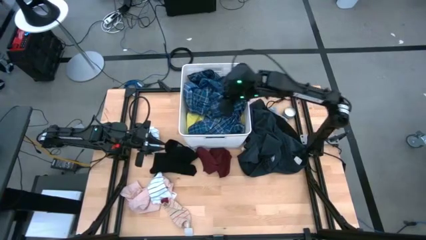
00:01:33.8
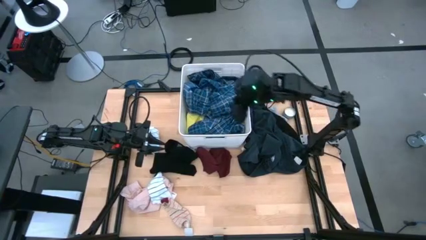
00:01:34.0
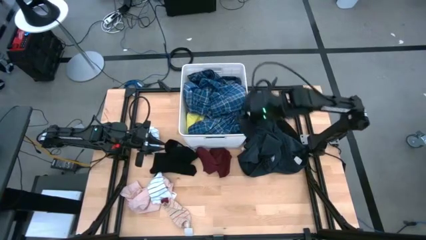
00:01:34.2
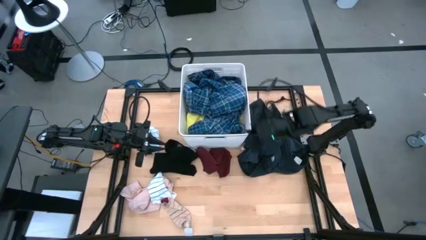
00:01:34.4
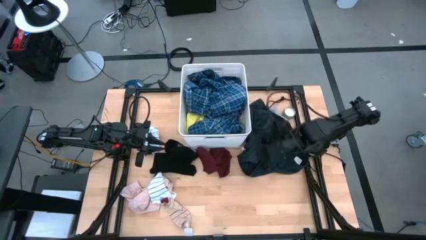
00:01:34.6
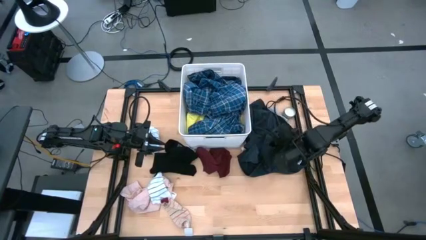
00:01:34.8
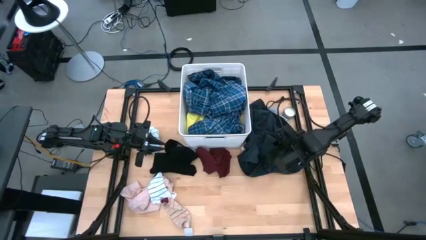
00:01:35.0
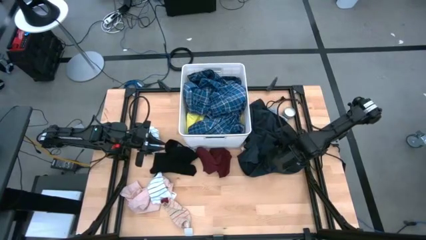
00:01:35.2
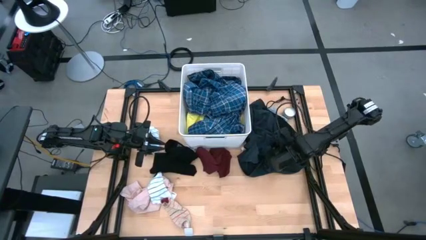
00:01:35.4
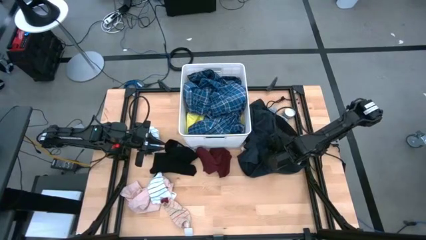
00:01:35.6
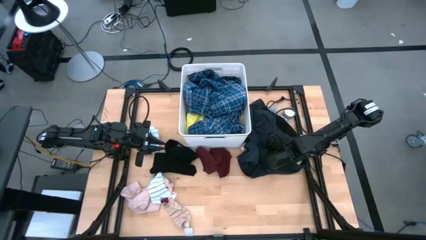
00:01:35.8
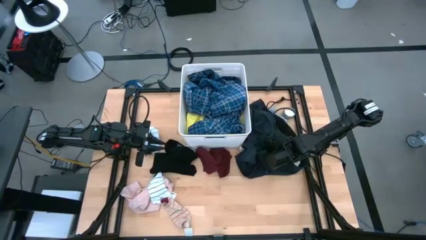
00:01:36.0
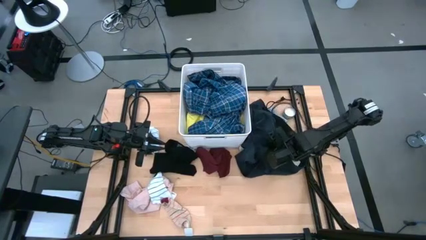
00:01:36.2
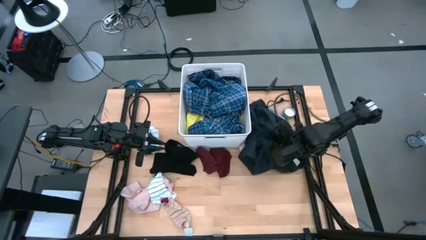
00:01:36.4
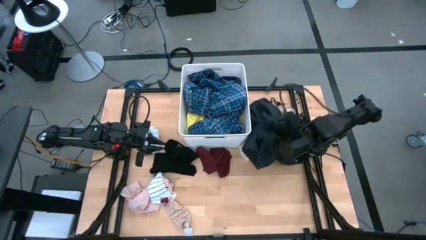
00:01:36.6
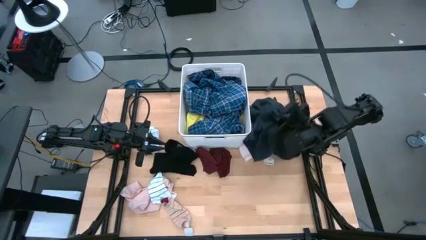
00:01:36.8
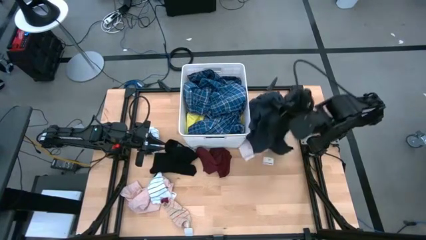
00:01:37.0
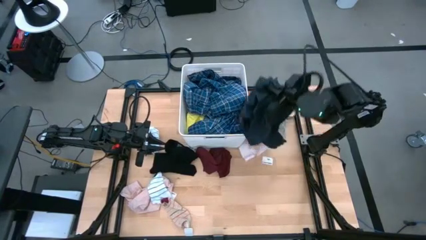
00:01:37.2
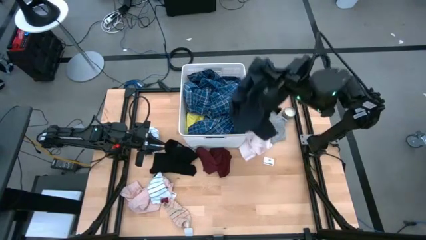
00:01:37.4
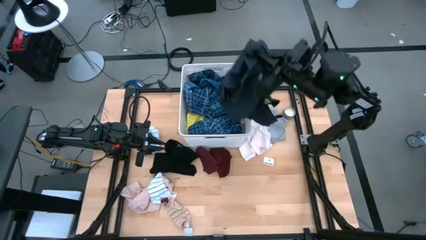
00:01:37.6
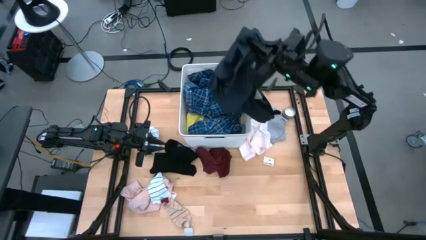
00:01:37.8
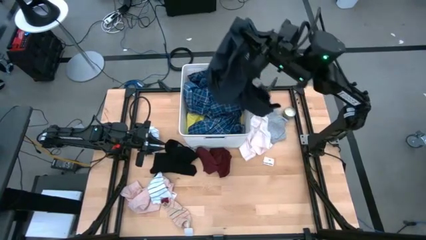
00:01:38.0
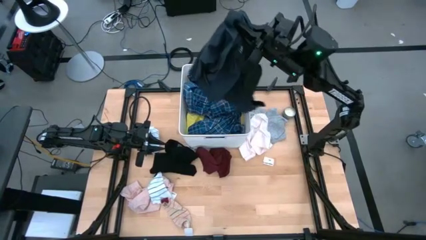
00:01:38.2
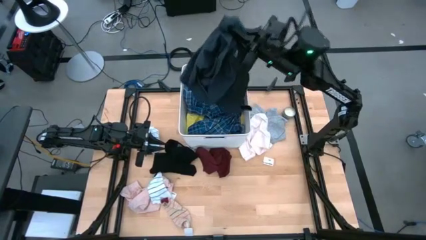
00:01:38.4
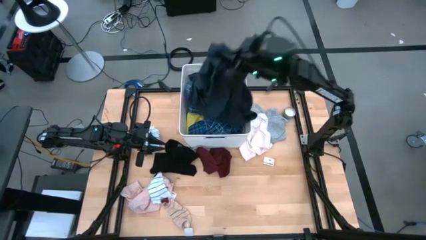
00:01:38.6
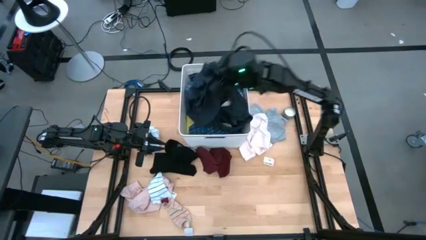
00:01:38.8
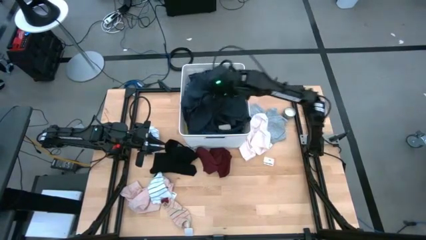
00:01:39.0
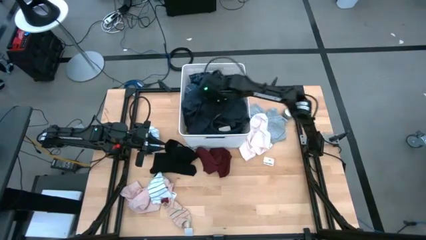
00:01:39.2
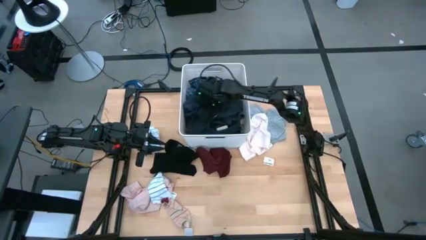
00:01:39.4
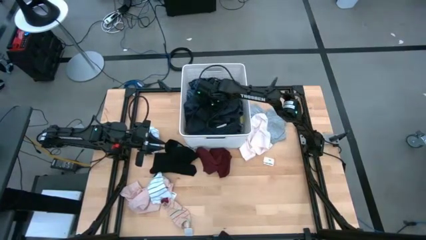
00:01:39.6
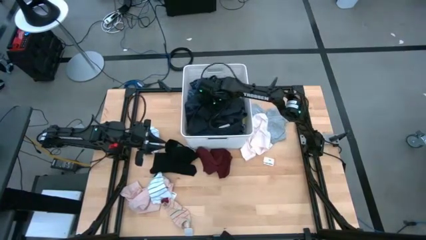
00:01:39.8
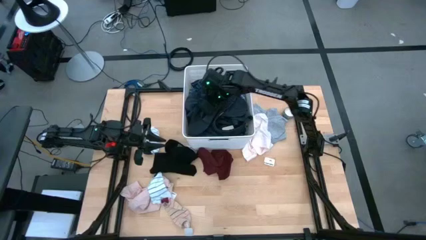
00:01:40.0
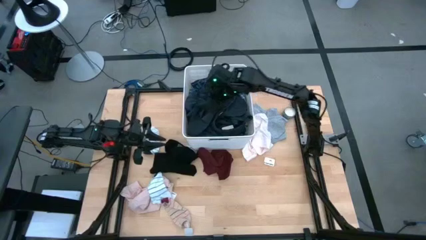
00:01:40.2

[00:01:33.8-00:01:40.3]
Task: Sort clothes
Put the dark green short into the laundry bin

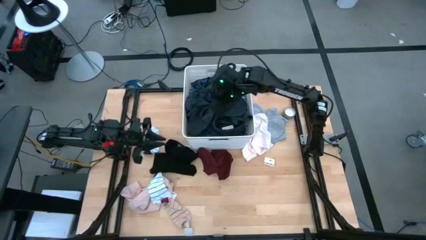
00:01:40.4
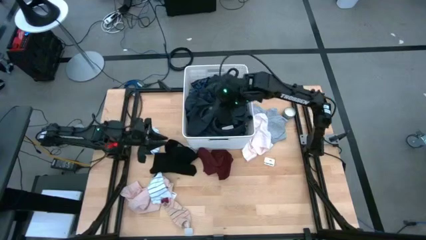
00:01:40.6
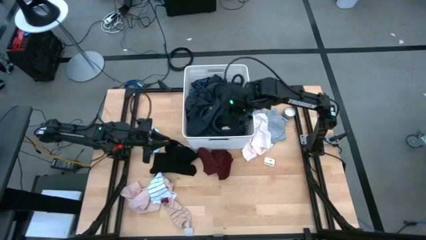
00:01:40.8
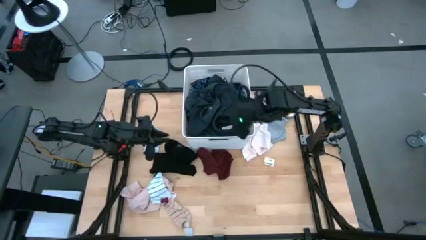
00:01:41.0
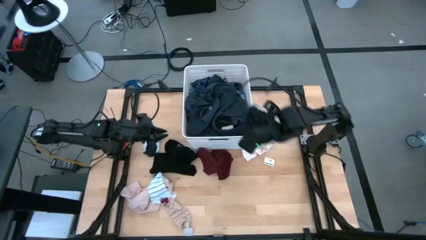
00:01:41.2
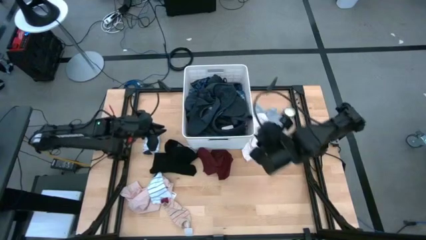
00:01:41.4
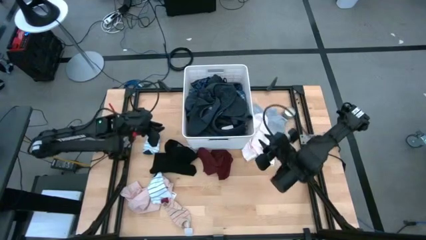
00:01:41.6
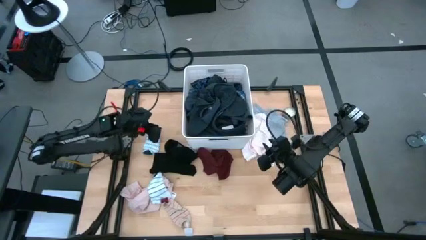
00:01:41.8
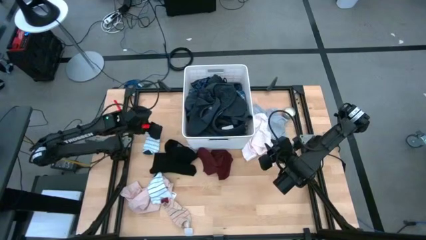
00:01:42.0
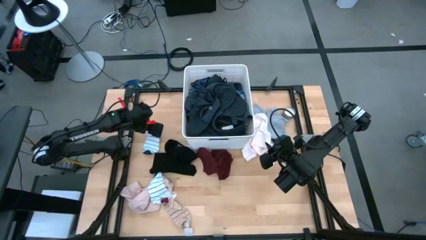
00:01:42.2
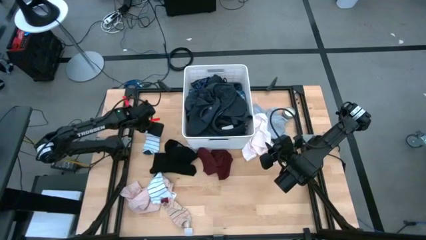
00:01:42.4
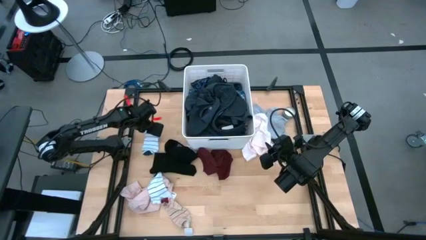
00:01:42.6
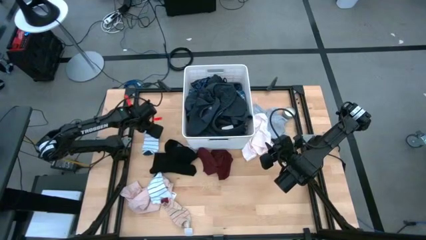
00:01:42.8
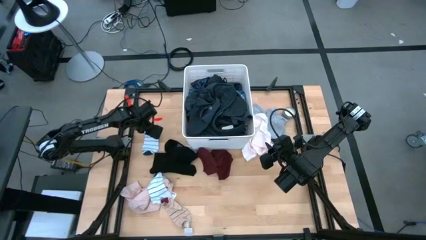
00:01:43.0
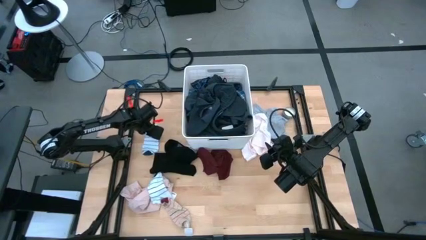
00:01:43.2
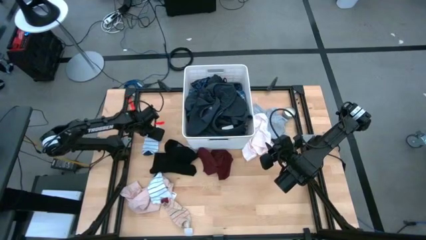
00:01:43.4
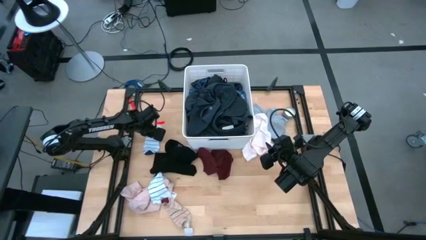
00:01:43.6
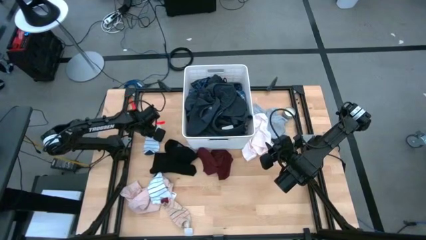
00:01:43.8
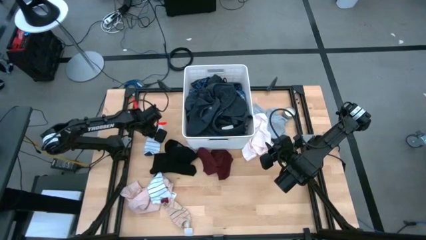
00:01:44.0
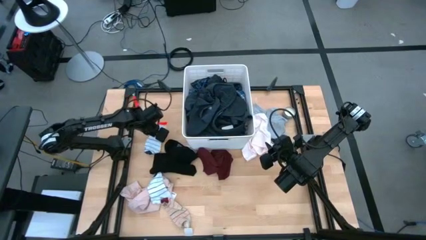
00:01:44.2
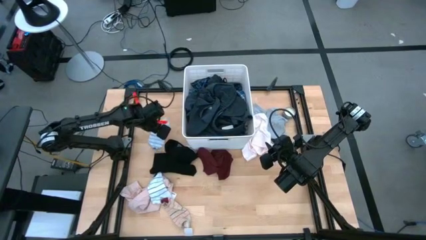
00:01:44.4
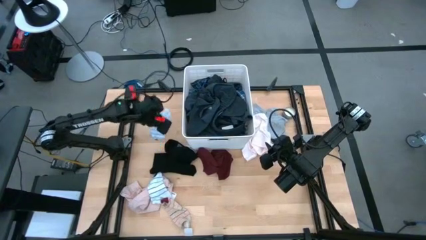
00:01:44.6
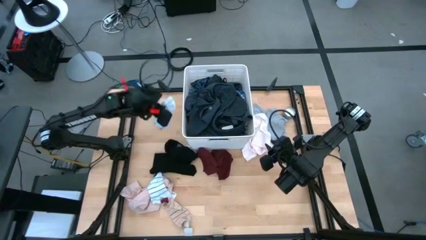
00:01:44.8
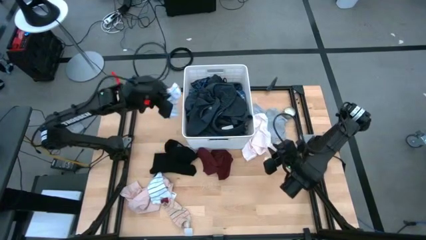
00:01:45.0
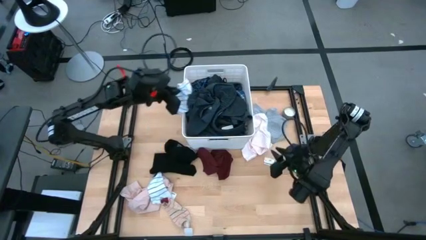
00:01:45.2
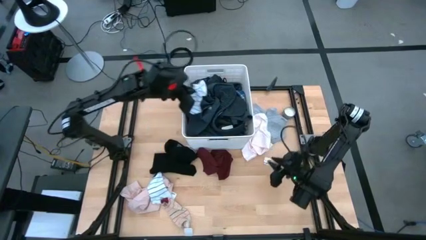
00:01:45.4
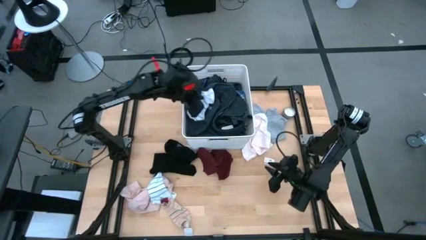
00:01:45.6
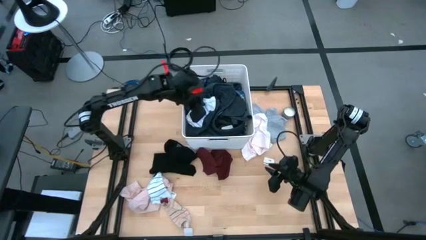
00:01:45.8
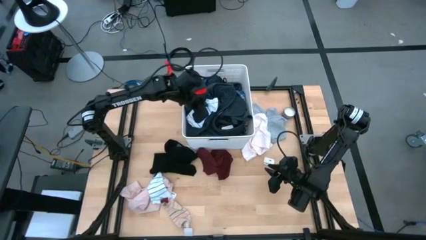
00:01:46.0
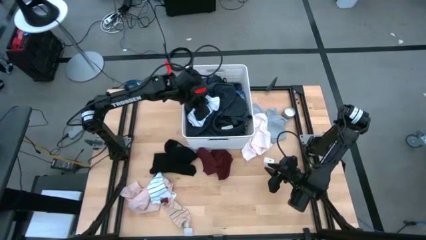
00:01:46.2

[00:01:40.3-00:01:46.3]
Put the white sock into the laundry bin

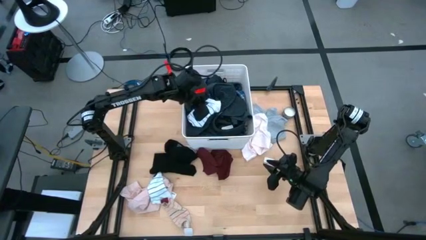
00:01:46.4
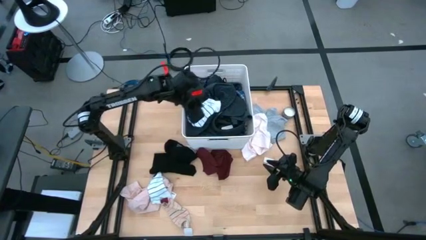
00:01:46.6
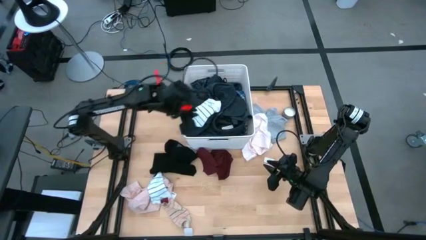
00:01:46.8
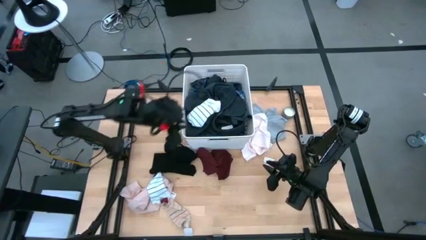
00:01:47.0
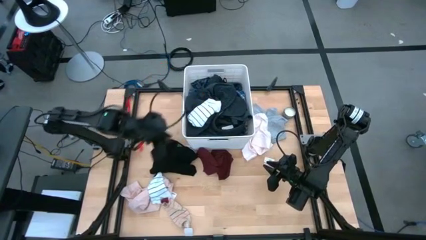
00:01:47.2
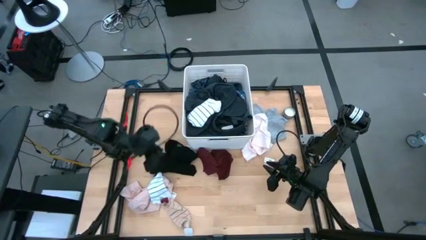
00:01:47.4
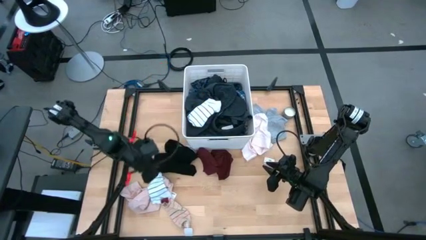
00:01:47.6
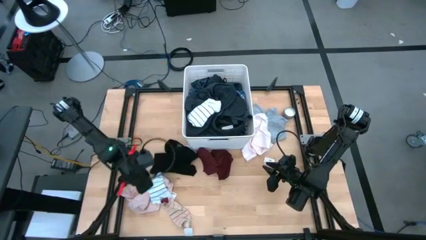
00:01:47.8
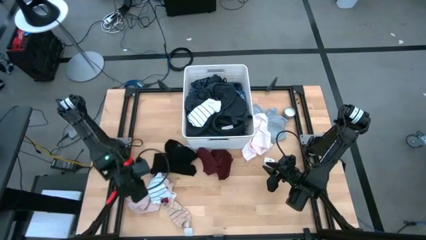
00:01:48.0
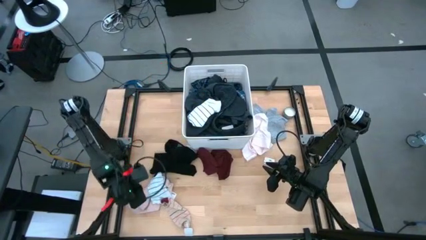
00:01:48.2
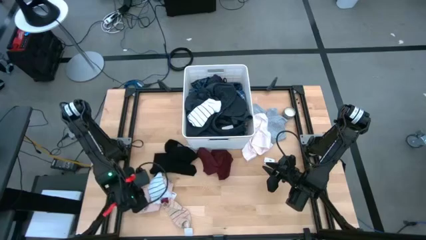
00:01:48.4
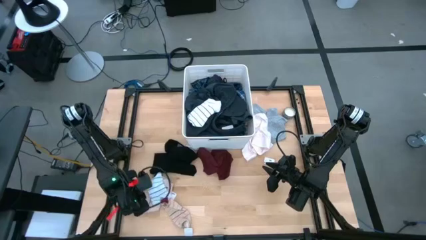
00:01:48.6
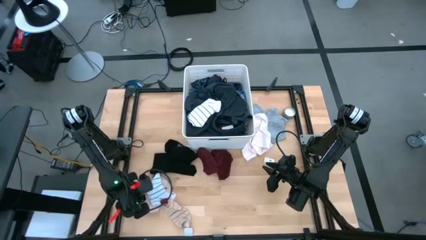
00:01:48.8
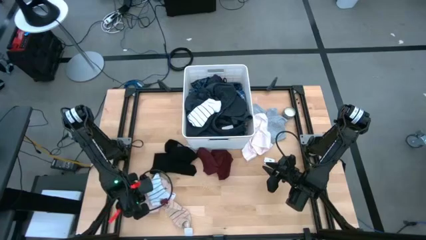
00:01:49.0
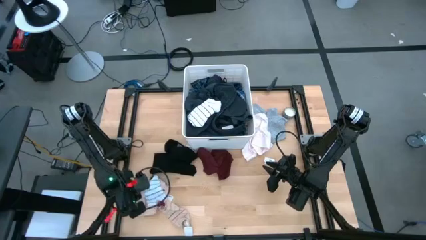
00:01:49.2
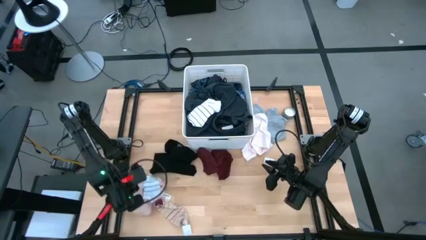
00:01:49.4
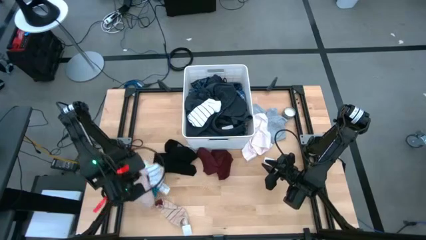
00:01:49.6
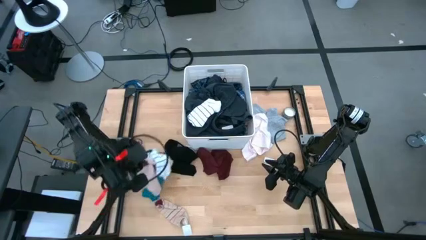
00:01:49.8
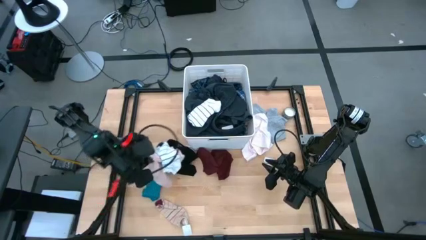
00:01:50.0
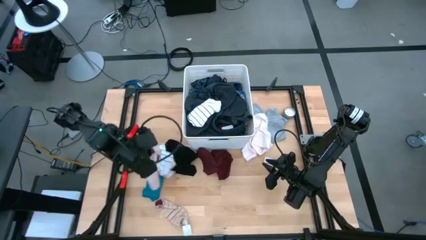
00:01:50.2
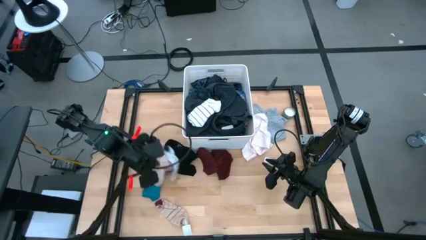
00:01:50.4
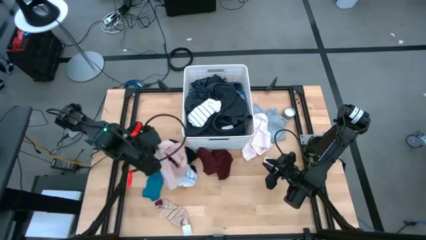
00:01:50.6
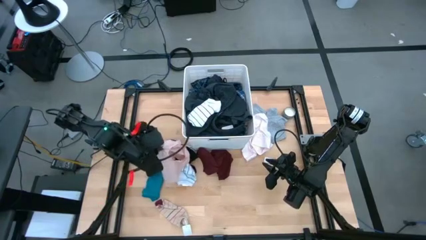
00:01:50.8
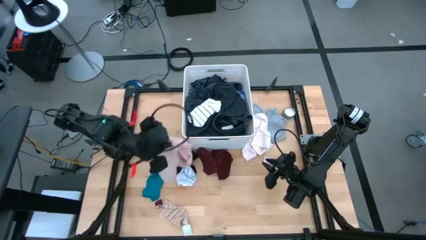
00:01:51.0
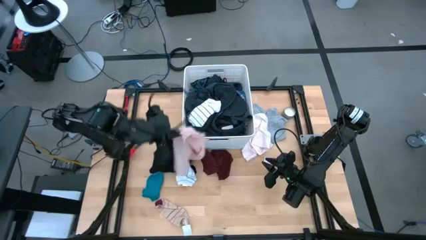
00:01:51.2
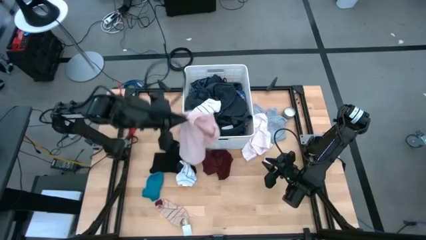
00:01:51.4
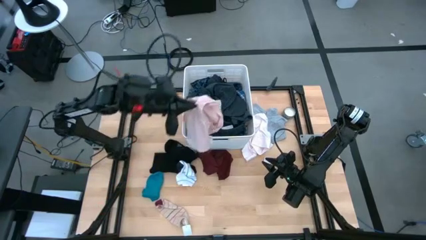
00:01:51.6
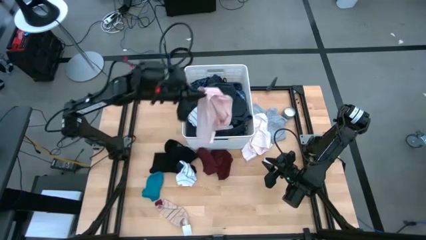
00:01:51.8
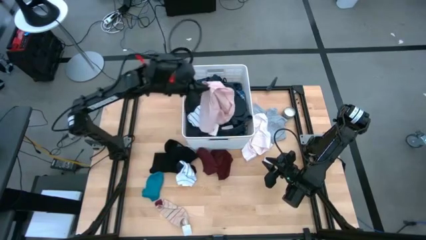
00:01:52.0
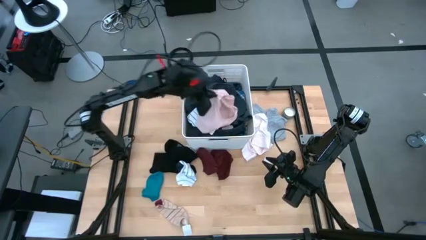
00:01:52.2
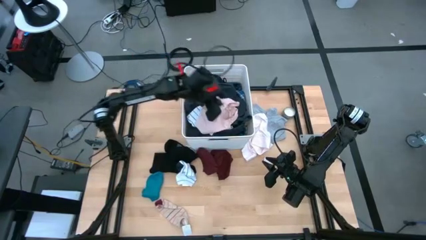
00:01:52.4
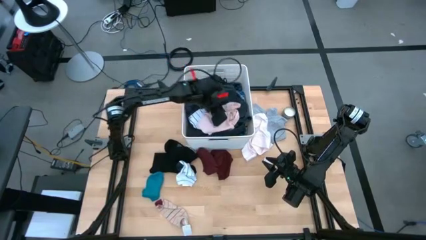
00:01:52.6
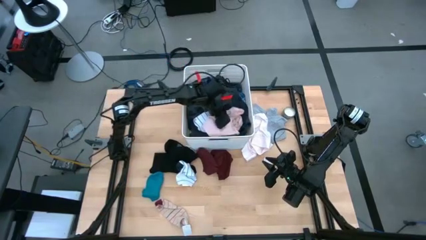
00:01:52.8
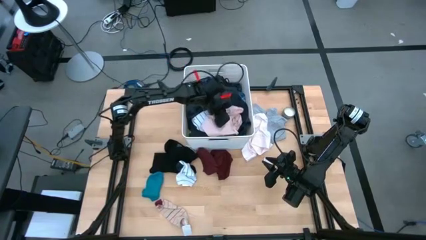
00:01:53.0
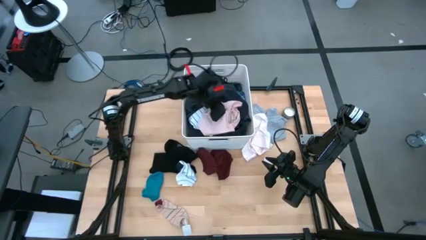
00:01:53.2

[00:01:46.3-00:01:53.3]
Put the pink underwear into the laundry bin
